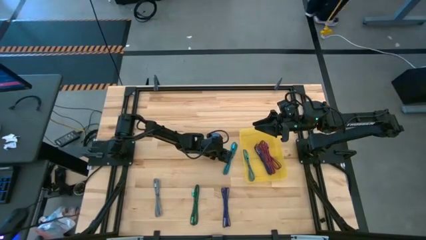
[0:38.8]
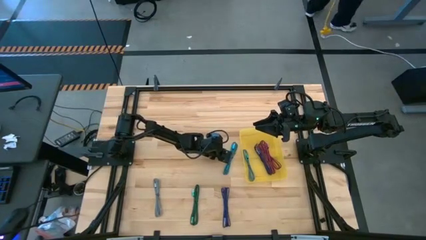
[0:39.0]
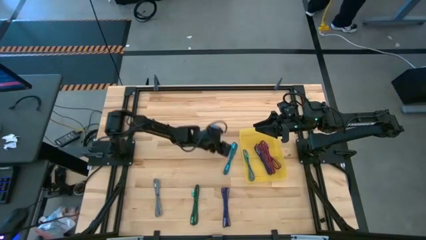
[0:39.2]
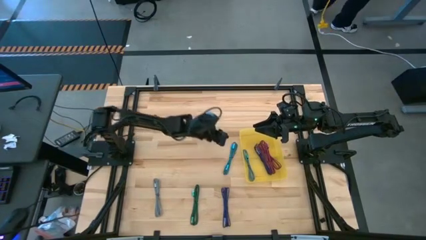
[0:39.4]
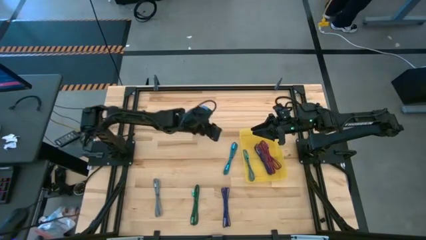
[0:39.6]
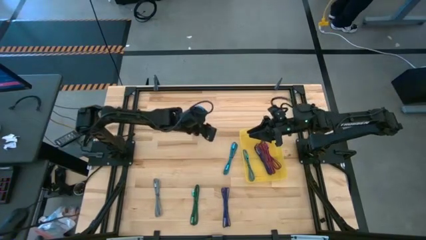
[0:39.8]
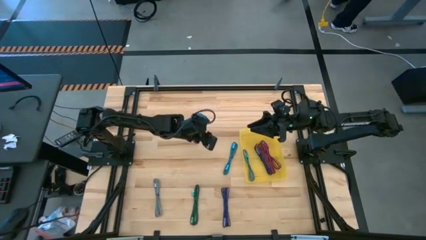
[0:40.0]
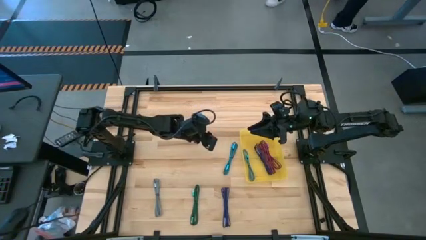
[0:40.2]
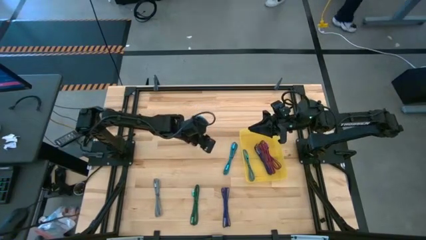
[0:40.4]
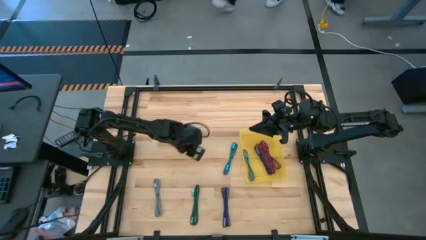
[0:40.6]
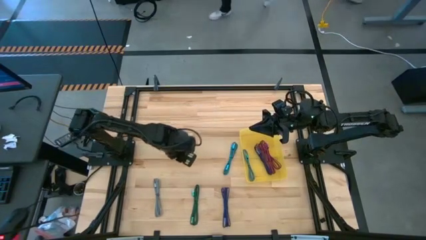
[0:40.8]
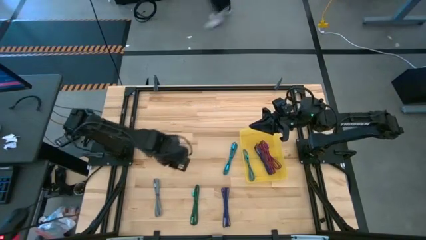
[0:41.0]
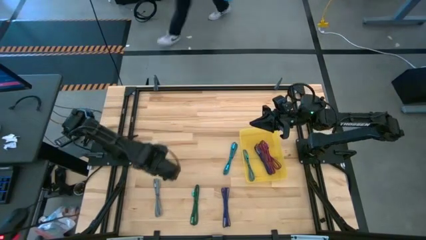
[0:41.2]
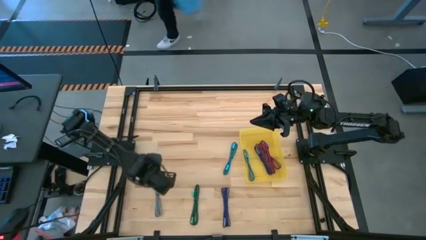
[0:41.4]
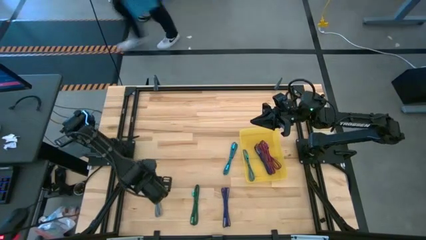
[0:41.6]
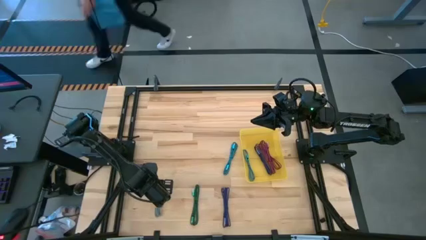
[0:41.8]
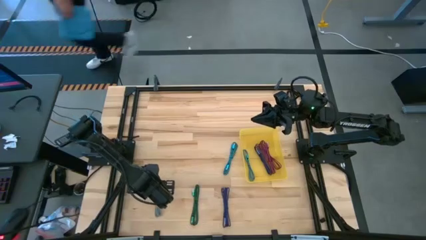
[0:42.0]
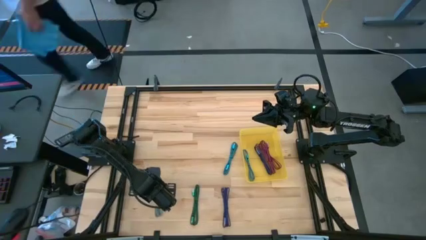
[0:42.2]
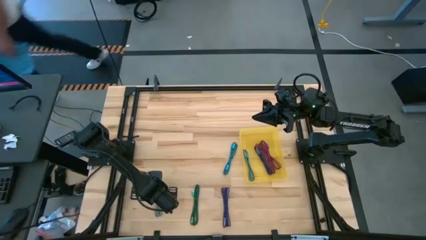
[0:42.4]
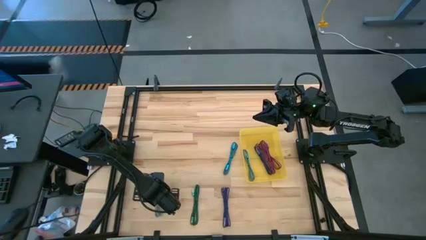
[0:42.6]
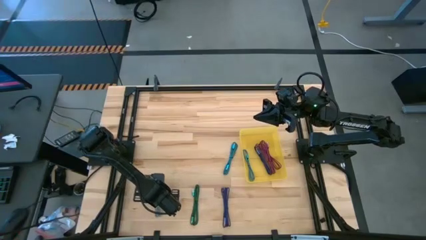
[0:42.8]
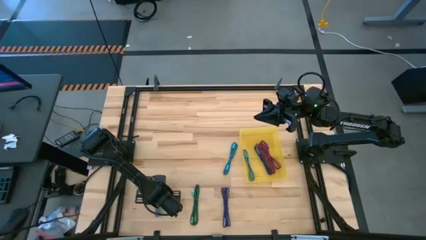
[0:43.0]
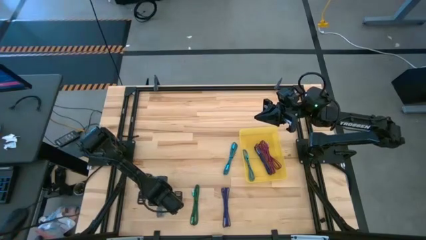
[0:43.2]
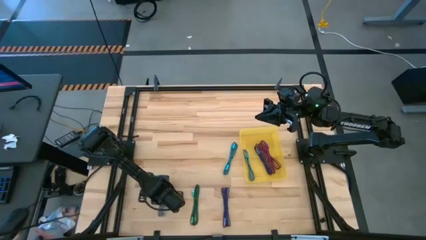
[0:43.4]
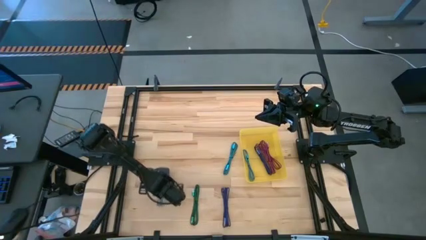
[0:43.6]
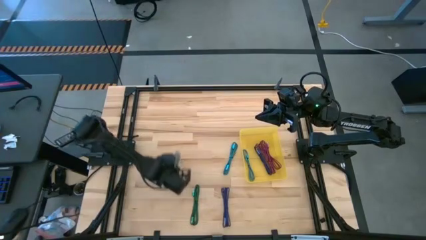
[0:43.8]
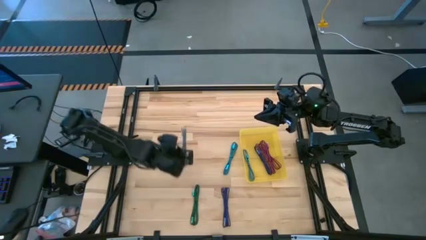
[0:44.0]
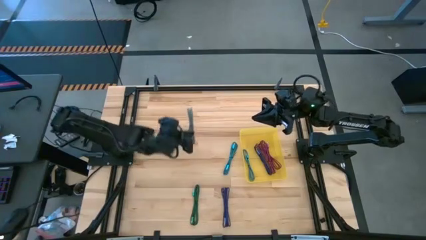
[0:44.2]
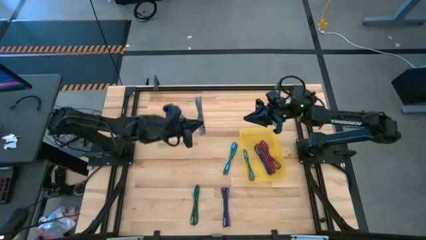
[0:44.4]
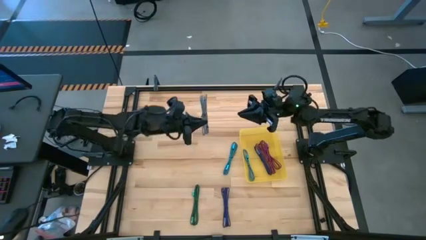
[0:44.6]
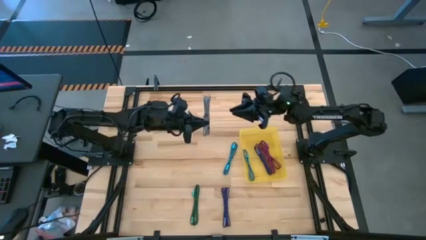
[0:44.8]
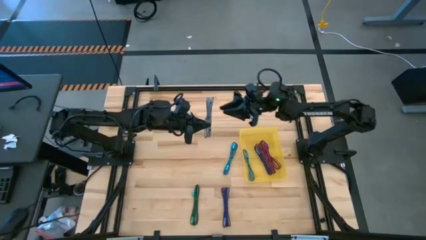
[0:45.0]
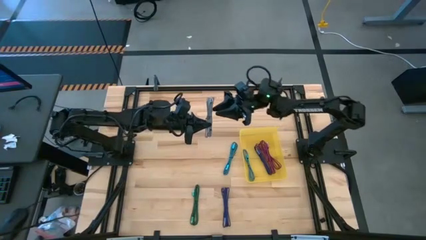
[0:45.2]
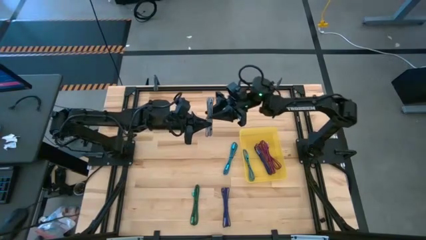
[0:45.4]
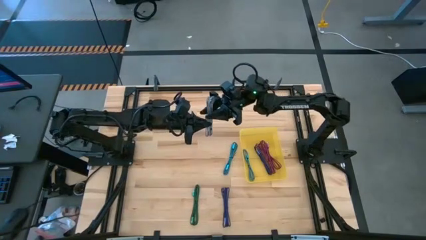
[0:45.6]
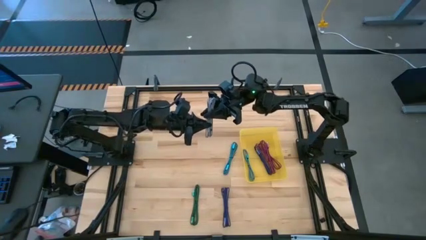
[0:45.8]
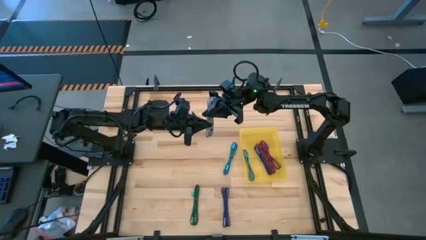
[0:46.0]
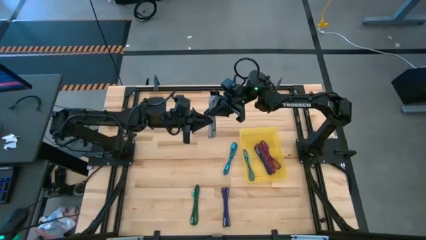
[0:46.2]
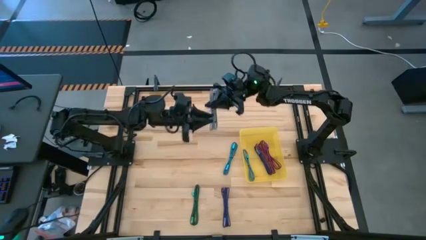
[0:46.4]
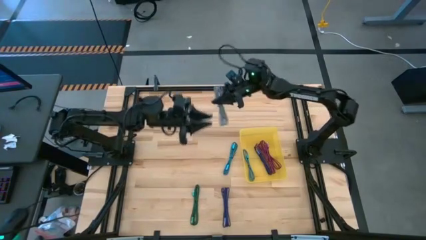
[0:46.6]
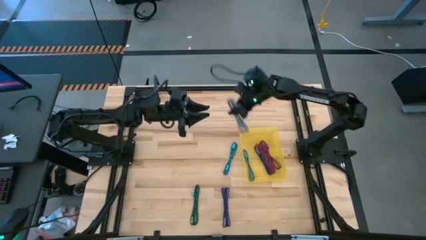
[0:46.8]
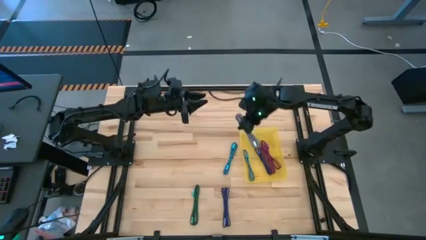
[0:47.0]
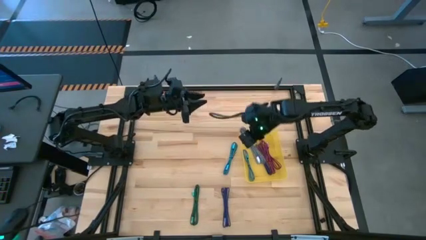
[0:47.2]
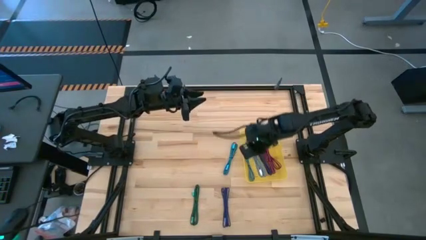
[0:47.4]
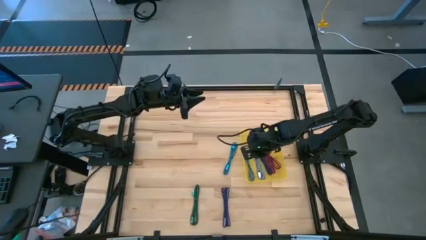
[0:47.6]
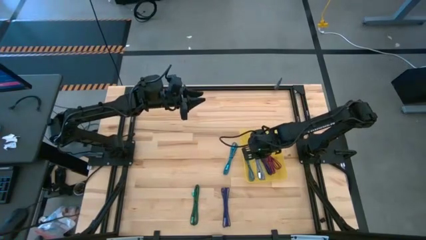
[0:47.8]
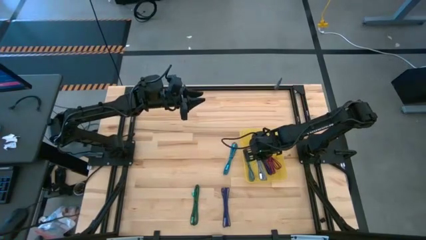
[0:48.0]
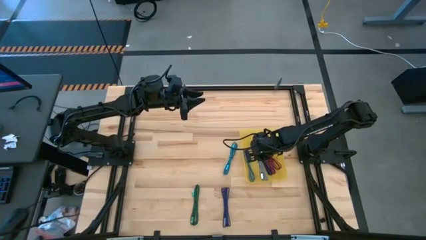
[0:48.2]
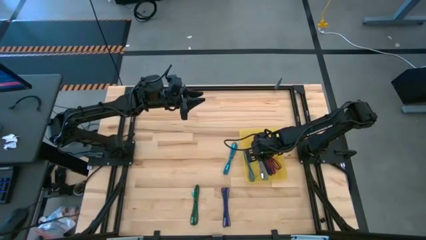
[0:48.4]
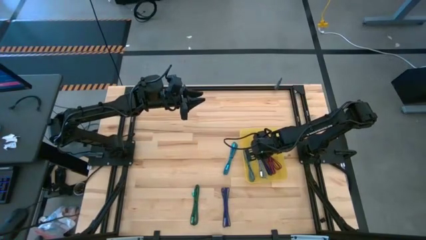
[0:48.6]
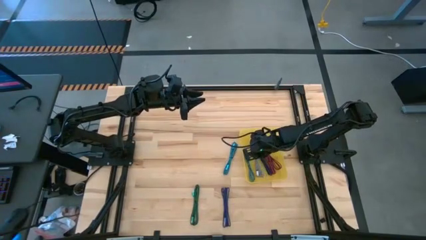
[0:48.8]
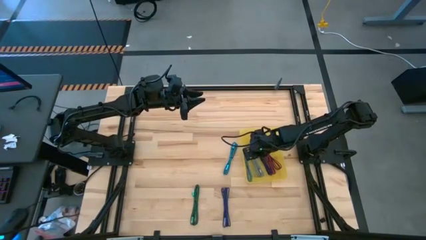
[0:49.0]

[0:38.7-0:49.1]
Task: Pick and place USB-C Cables
Put the gray charger cable into the yellow bin
